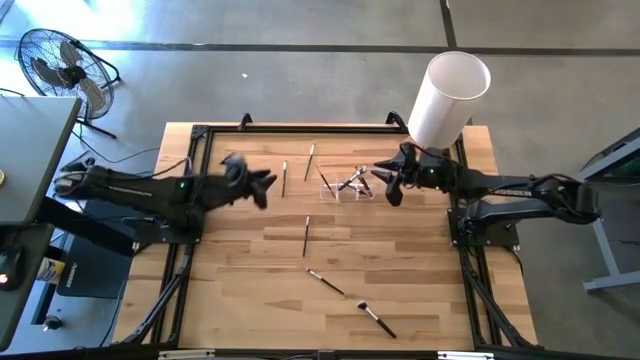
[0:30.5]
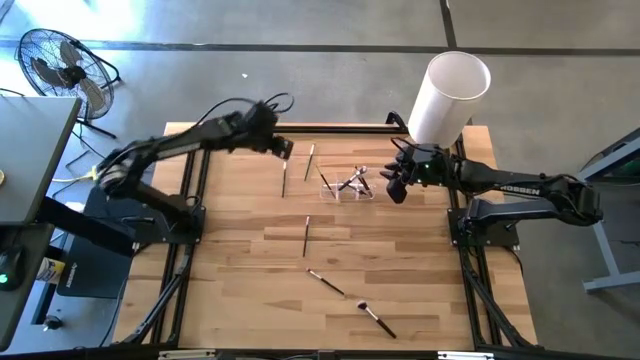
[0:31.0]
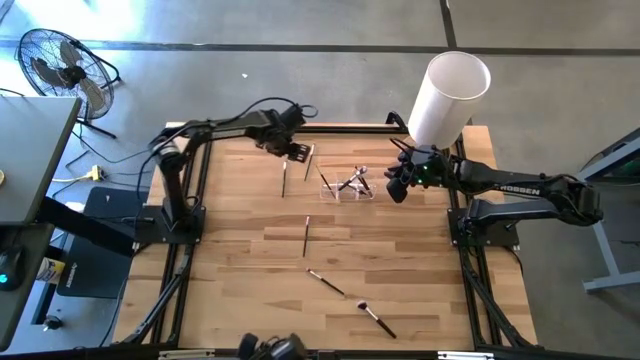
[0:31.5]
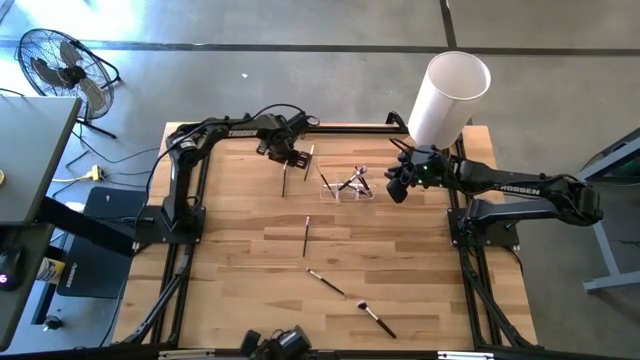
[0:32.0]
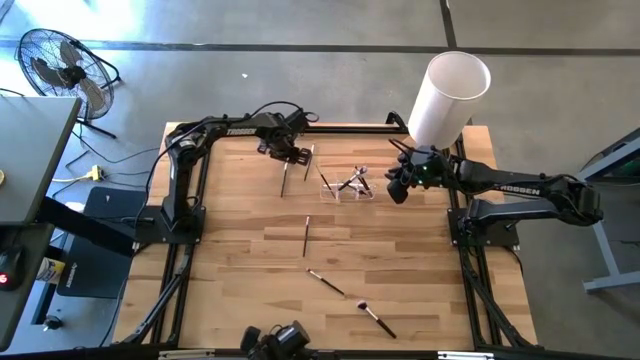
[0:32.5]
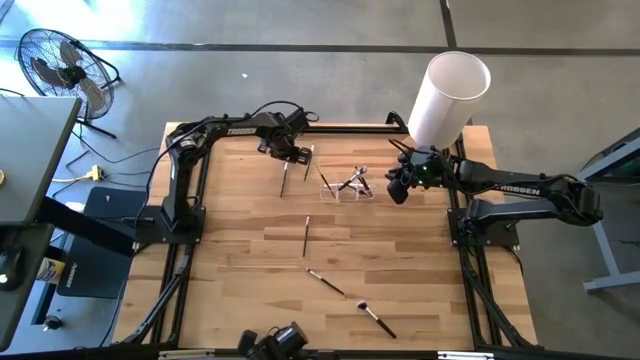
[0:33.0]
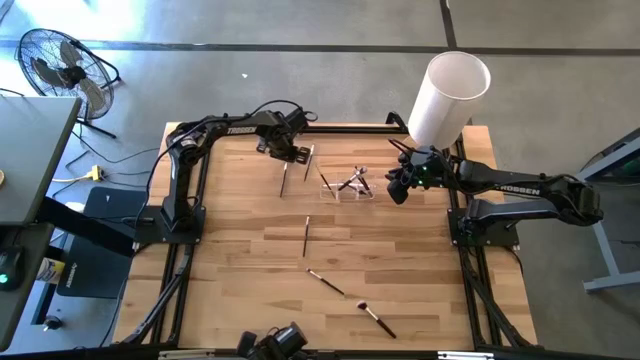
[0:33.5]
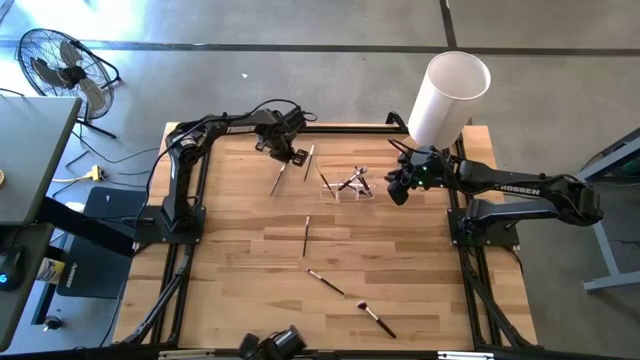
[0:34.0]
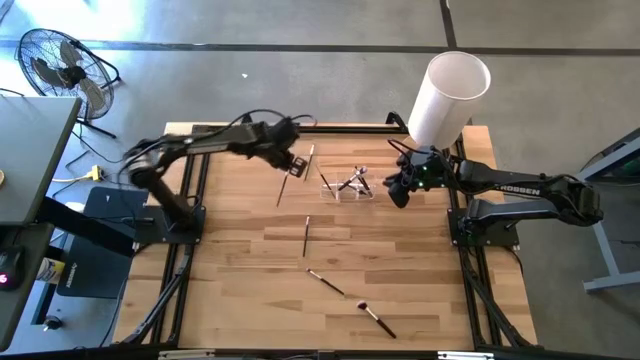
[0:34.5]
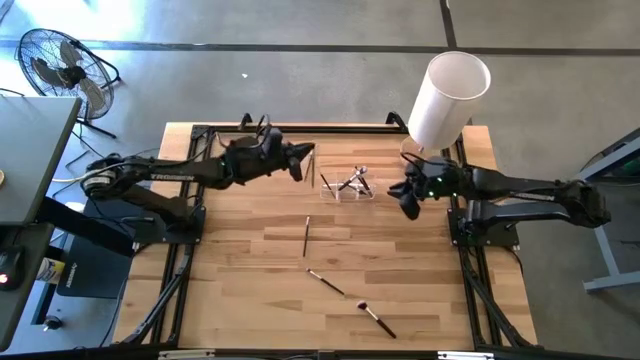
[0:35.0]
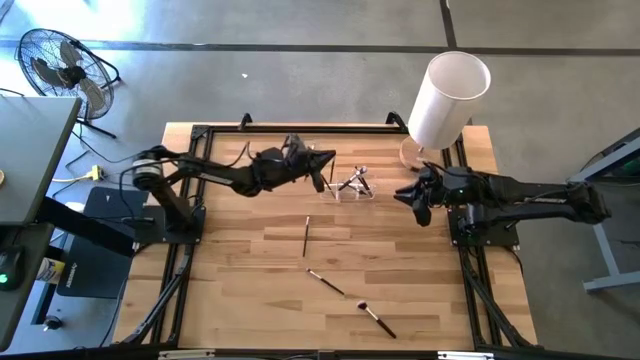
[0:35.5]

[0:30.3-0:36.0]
Task: Put items in baskets/containers
Put the eyeshadow brush into the left section of the transparent organizer

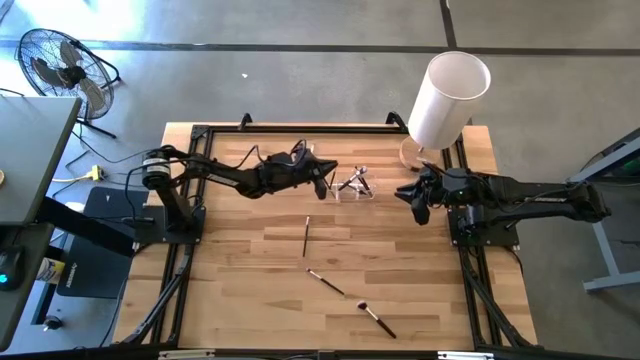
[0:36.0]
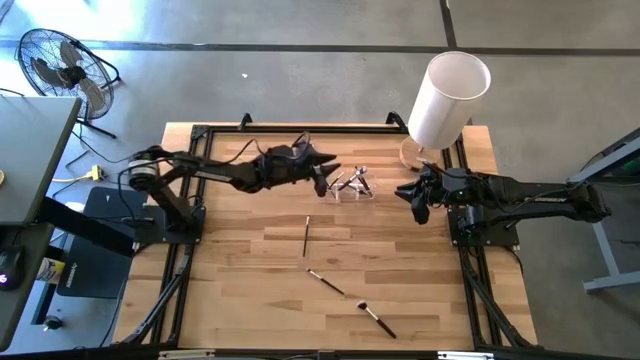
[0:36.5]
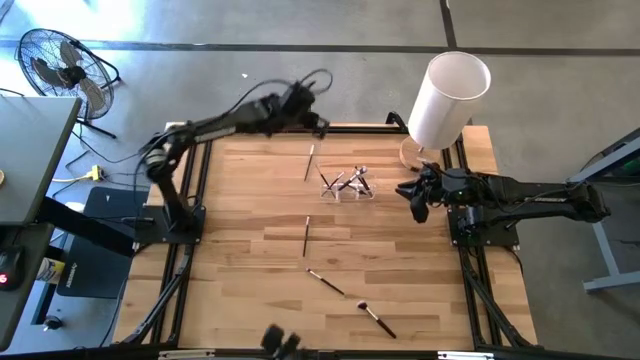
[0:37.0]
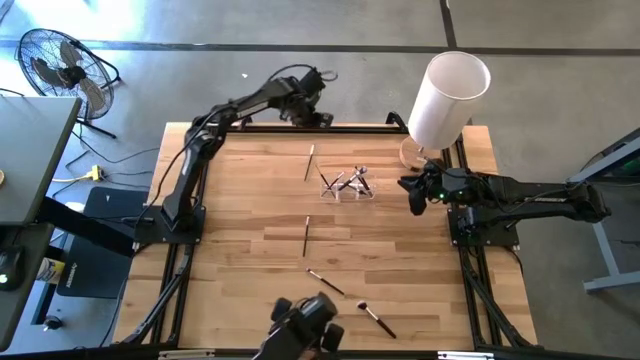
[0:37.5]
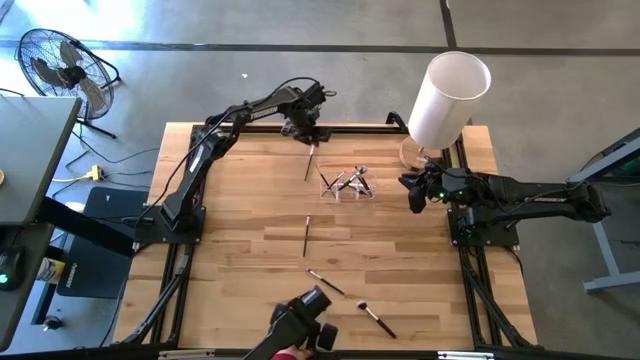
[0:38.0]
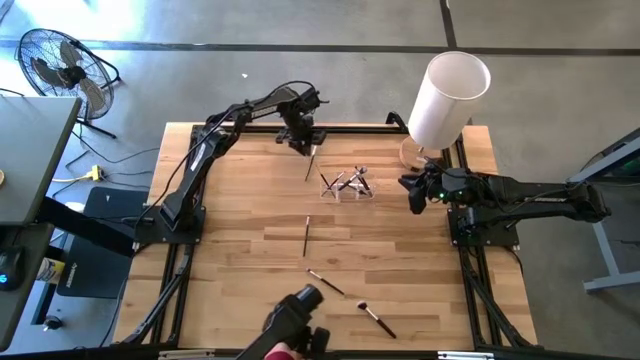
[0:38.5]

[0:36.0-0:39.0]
Put the eyeshadow brush into the middle section of the transparent organizer

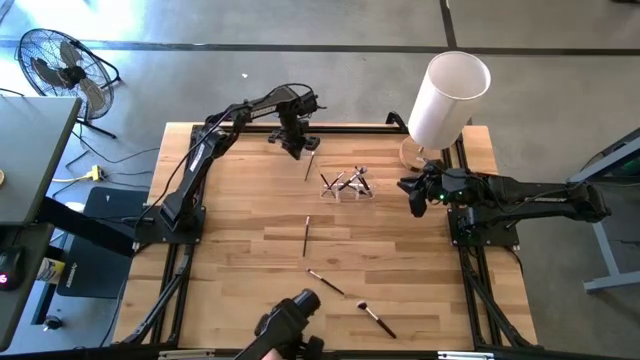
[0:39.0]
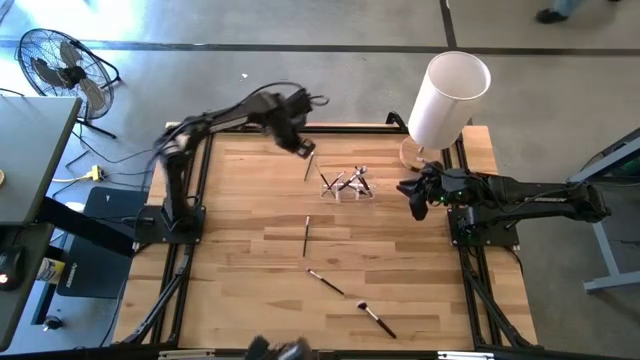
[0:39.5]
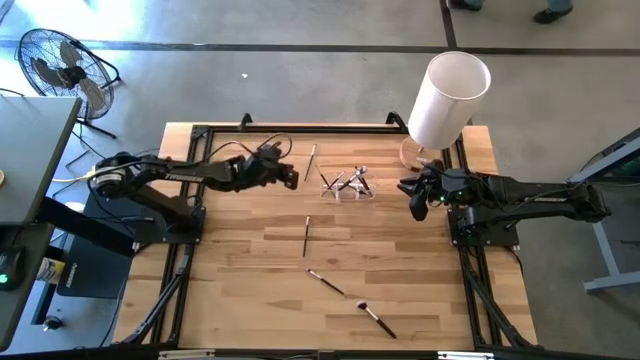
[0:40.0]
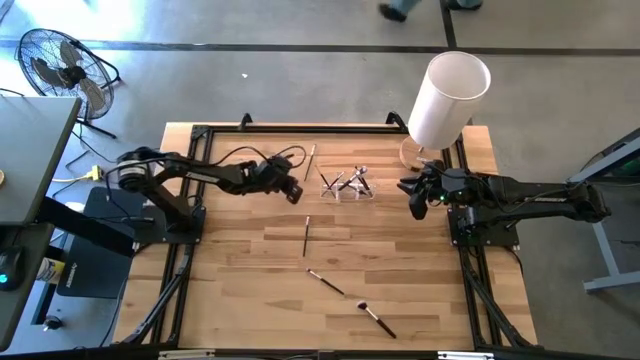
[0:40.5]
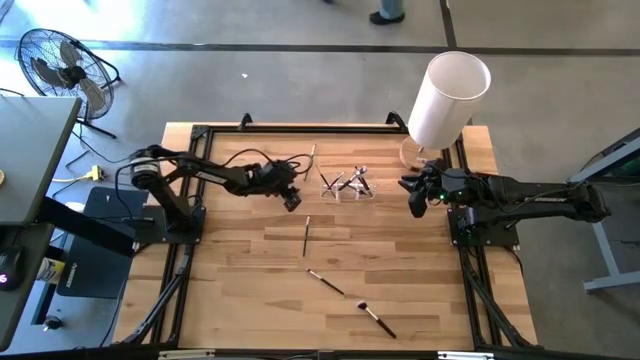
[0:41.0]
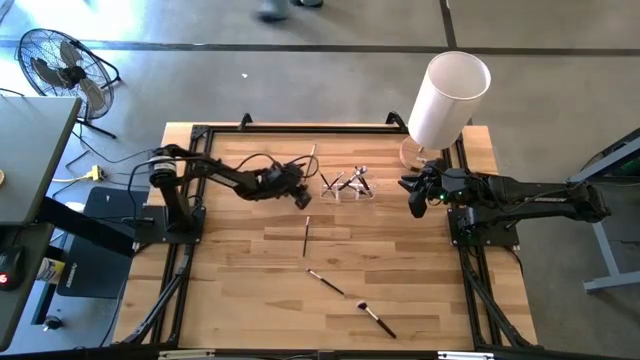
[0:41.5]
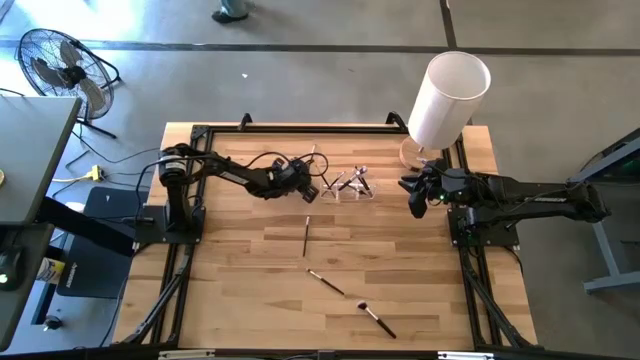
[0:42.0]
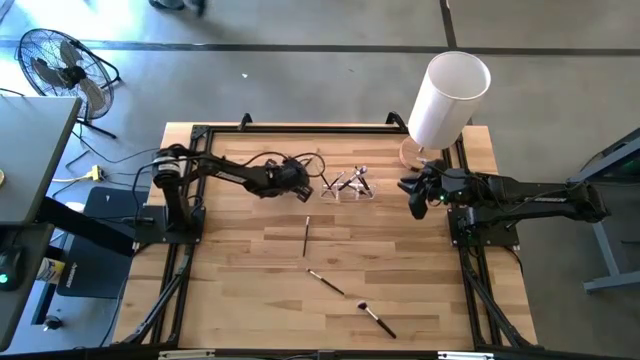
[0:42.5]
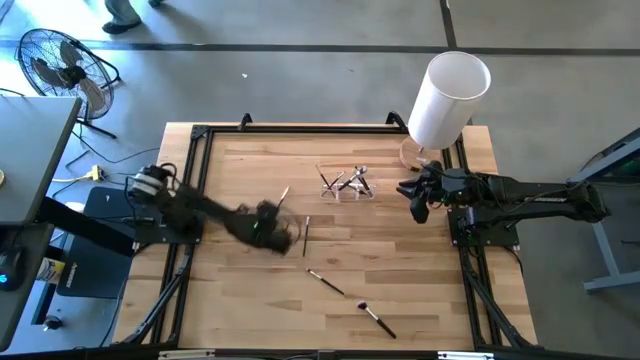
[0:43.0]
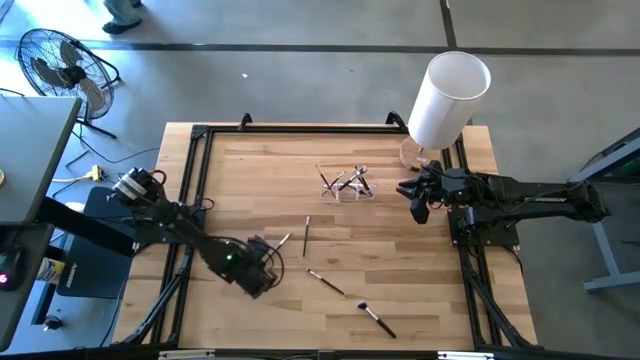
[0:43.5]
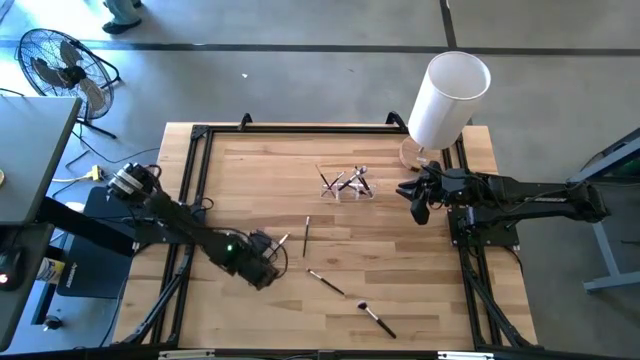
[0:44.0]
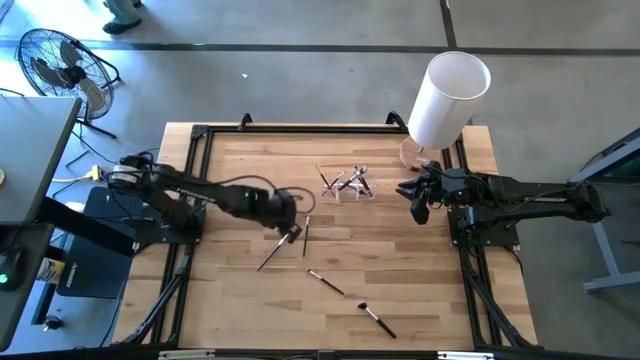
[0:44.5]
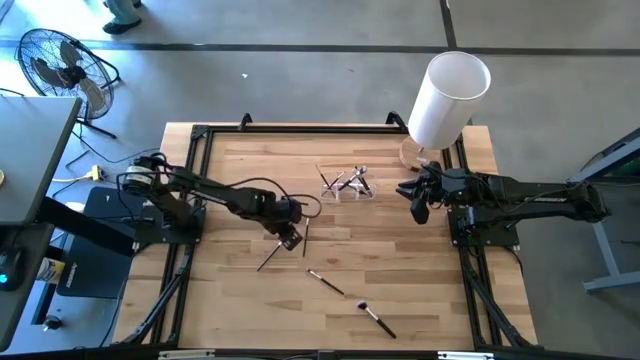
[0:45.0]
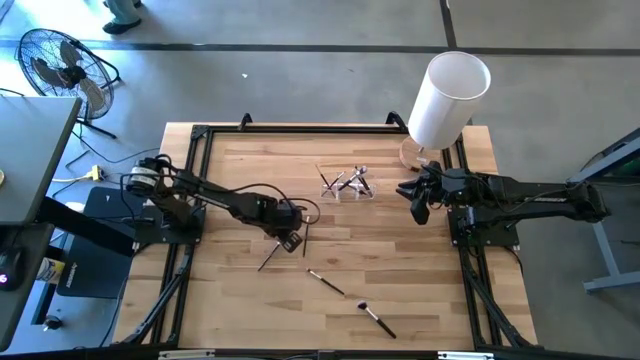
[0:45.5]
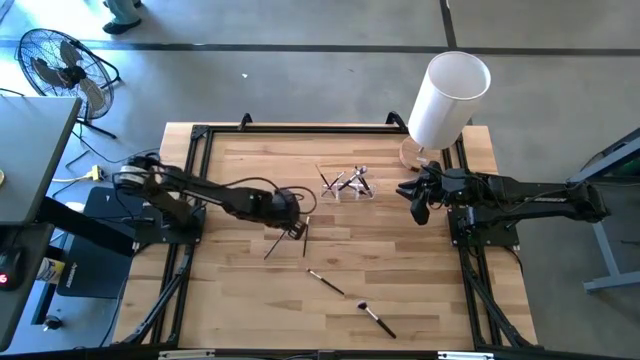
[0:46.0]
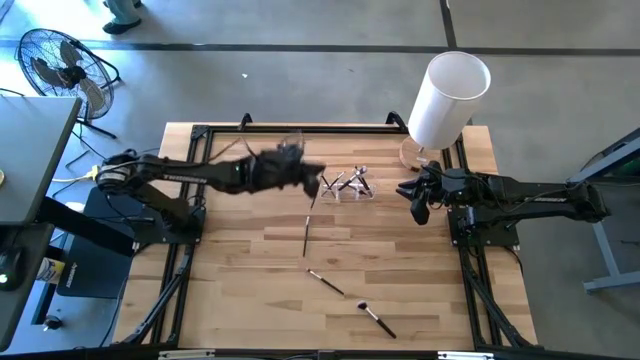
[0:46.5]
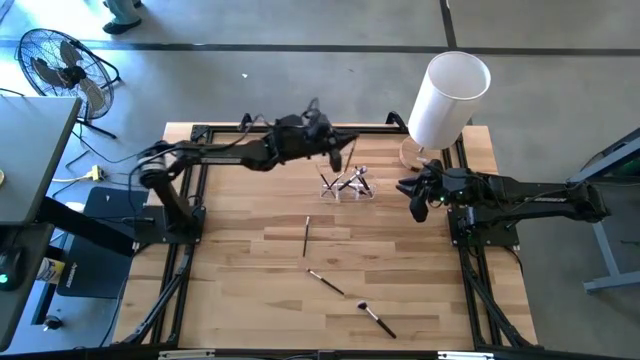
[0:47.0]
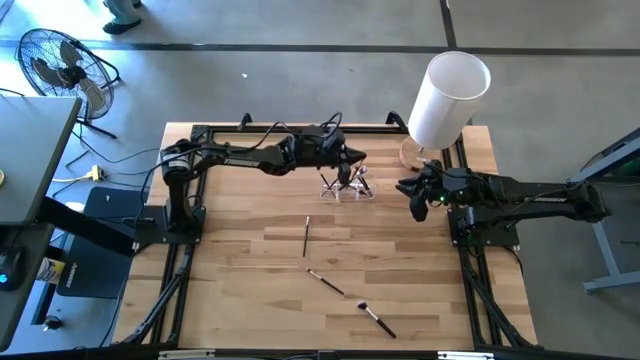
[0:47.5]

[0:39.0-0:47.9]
Put the eyeshadow brush into the middle section of the transparent organizer

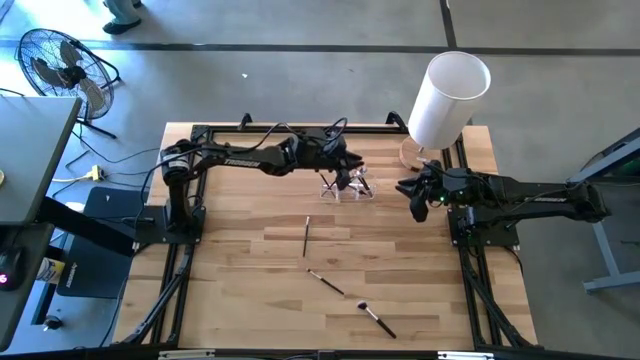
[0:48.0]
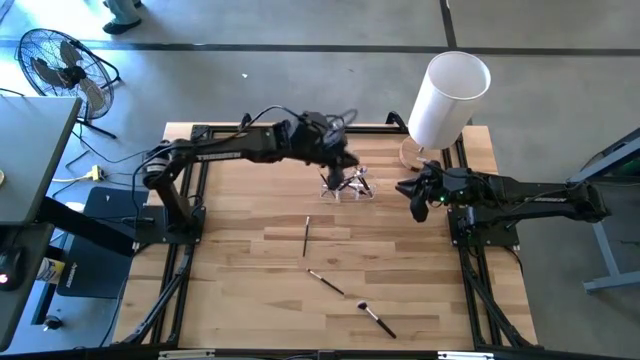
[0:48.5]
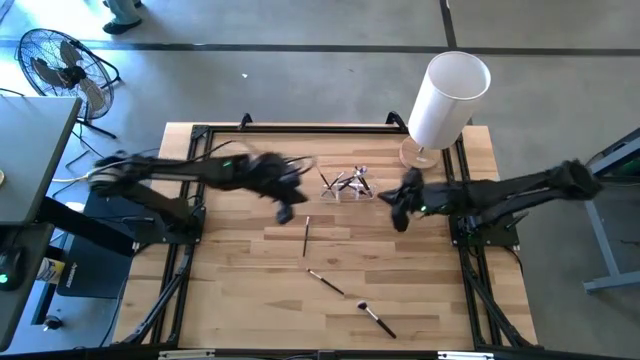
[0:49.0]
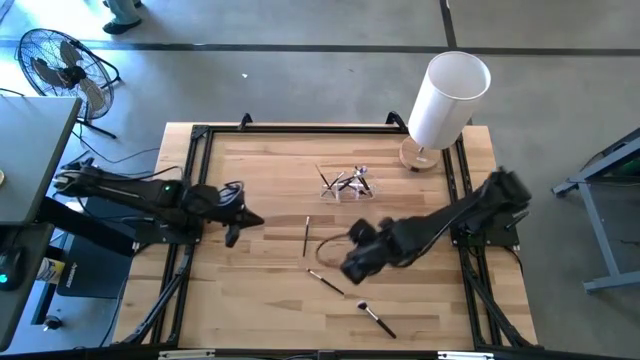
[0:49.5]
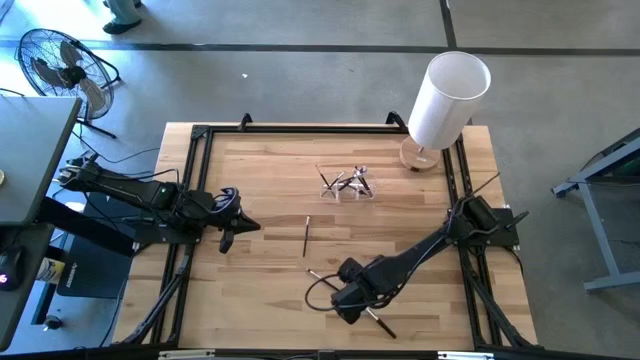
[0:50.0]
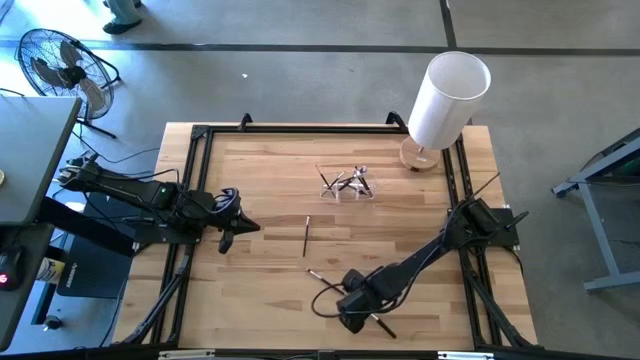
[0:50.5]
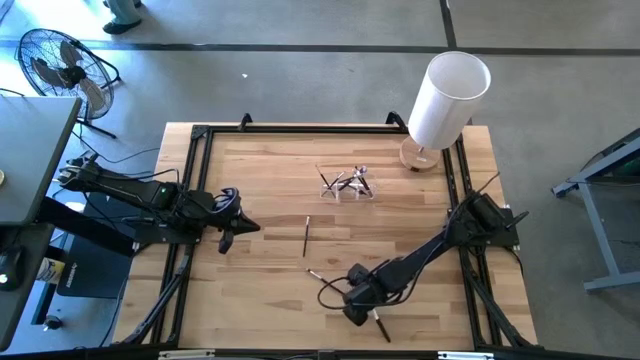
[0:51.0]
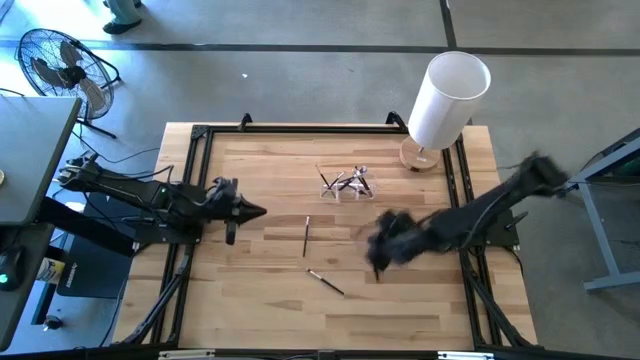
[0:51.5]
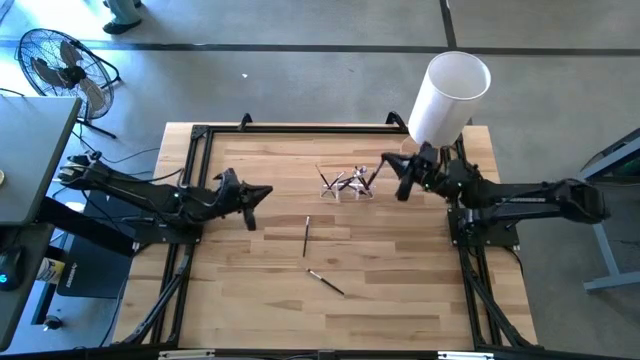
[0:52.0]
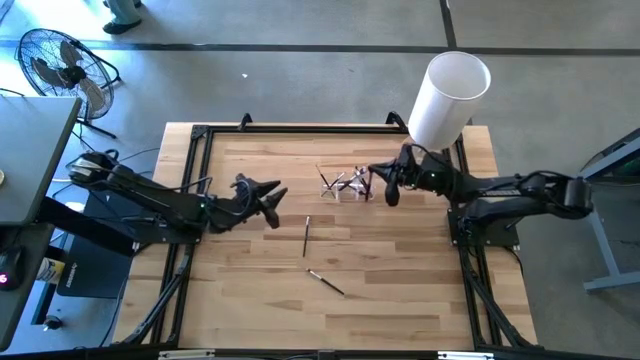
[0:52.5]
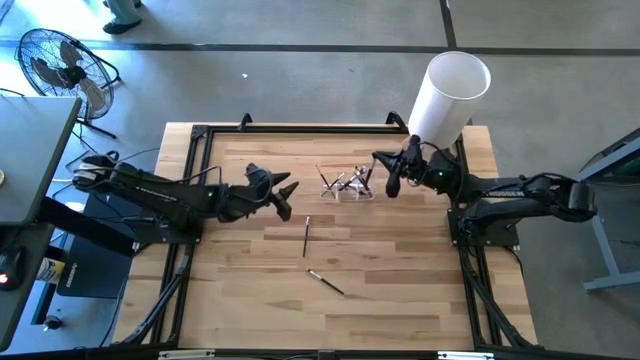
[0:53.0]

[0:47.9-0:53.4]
Put the powder brush into the right section of the transparent organizer
